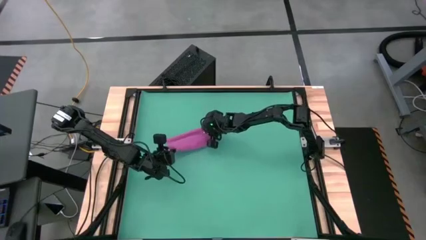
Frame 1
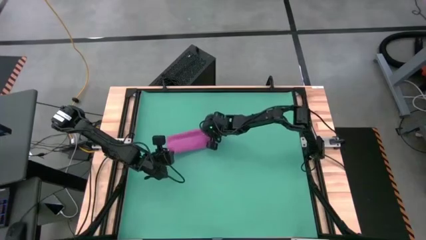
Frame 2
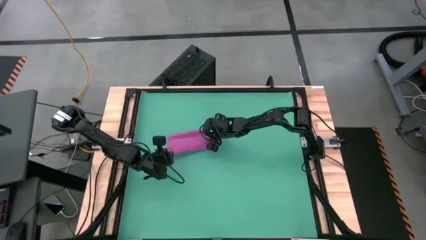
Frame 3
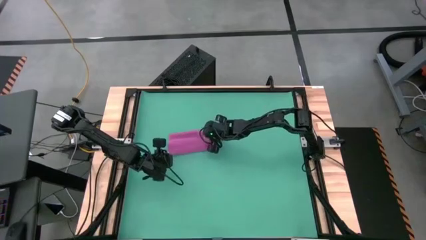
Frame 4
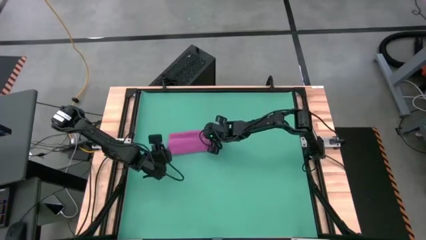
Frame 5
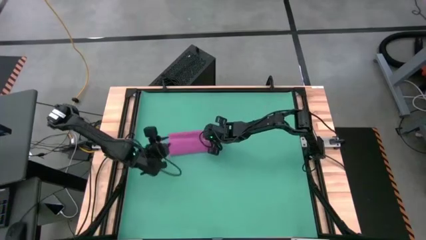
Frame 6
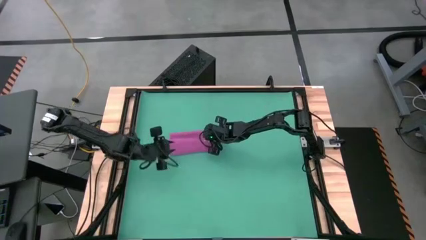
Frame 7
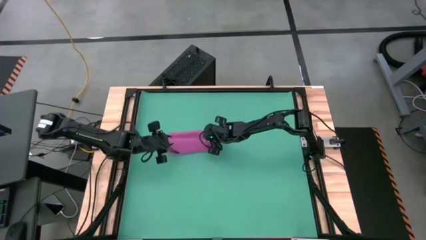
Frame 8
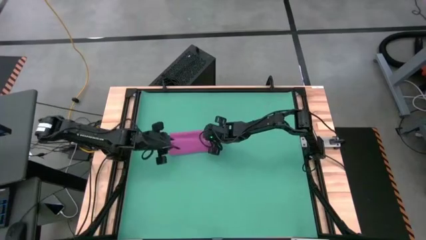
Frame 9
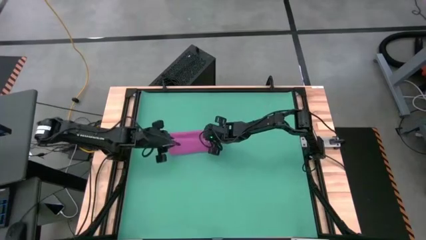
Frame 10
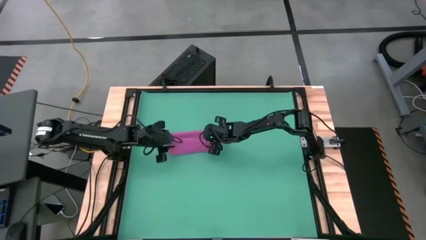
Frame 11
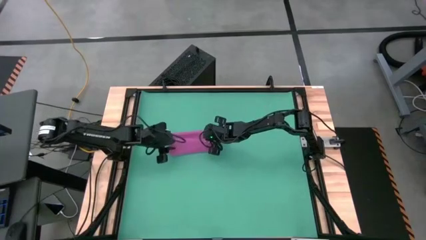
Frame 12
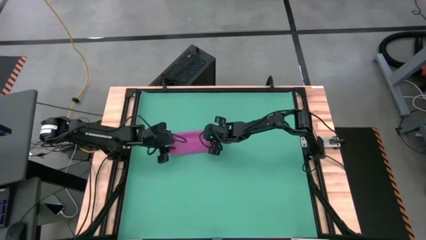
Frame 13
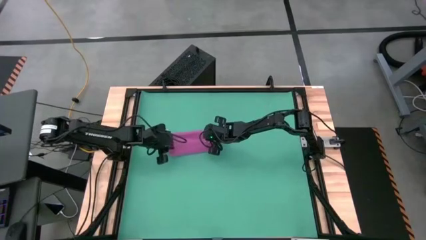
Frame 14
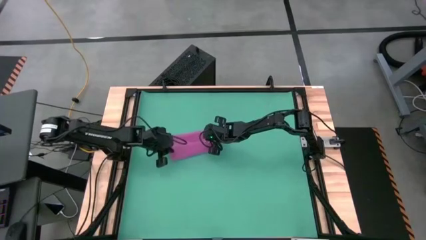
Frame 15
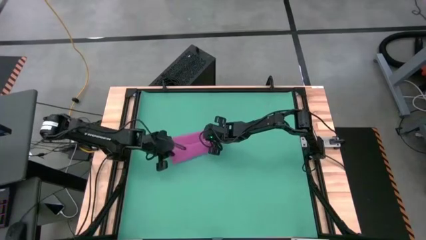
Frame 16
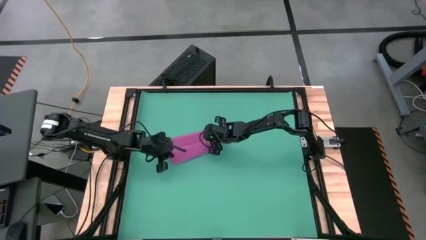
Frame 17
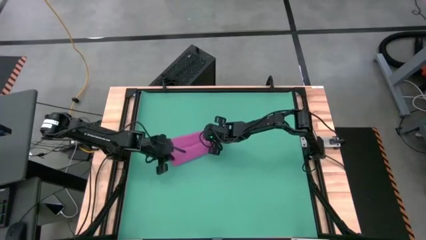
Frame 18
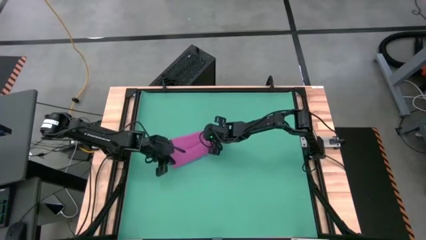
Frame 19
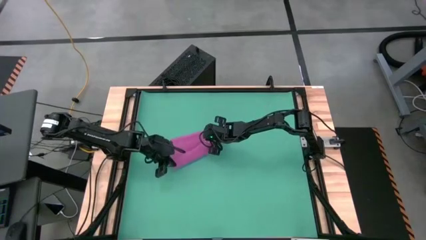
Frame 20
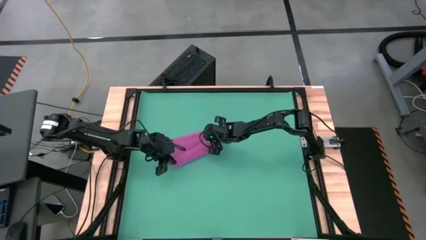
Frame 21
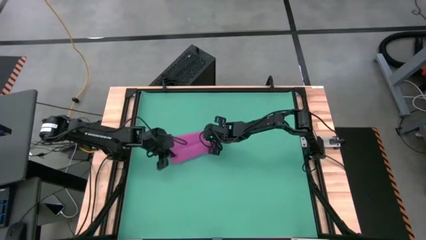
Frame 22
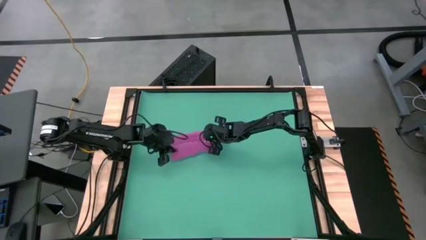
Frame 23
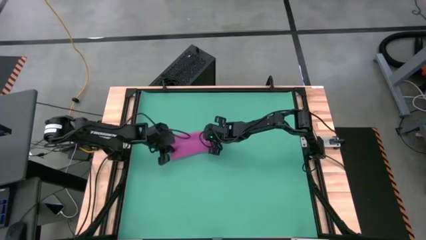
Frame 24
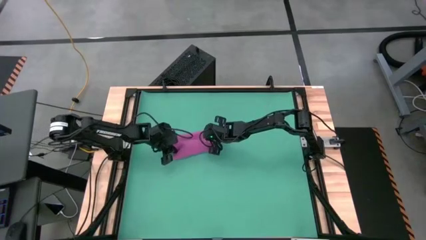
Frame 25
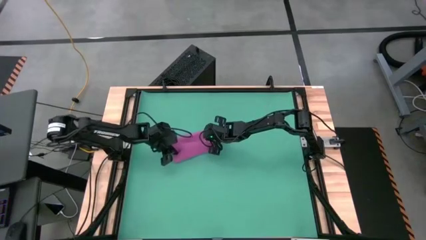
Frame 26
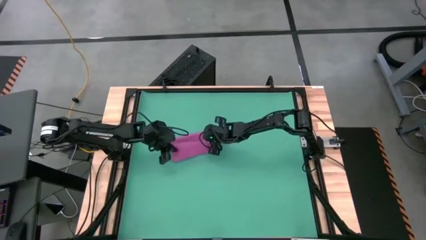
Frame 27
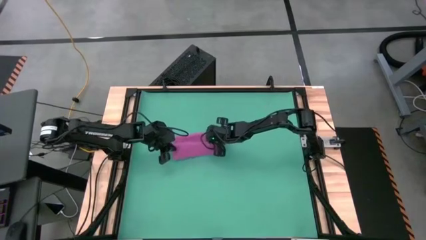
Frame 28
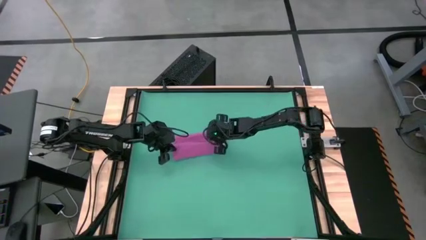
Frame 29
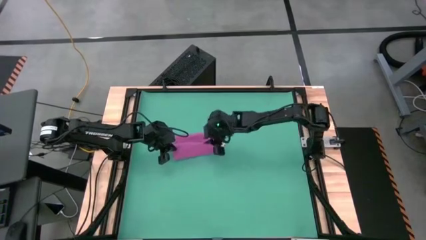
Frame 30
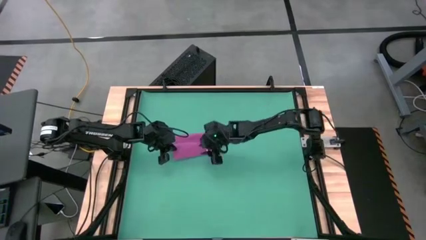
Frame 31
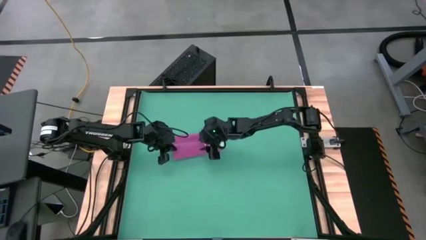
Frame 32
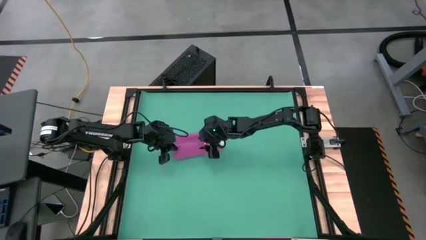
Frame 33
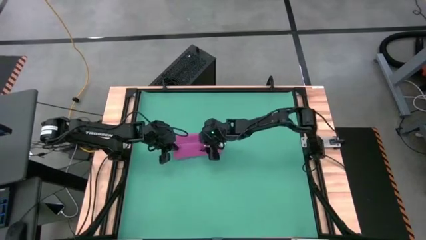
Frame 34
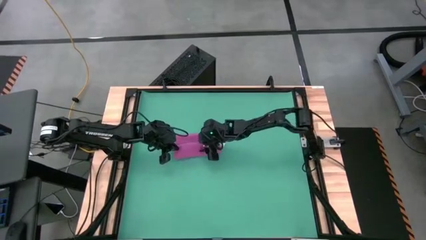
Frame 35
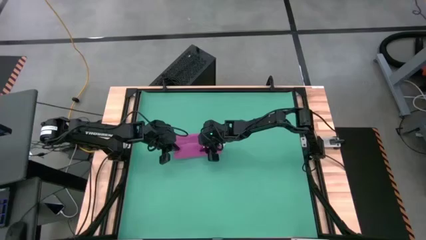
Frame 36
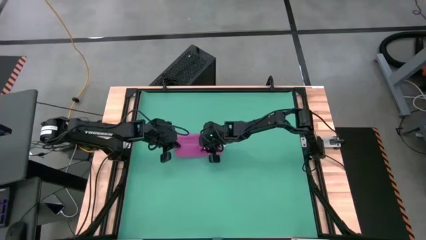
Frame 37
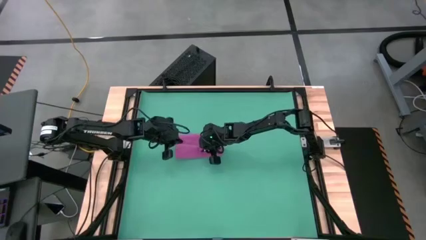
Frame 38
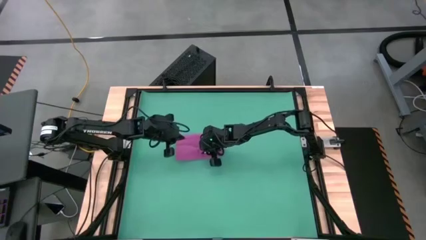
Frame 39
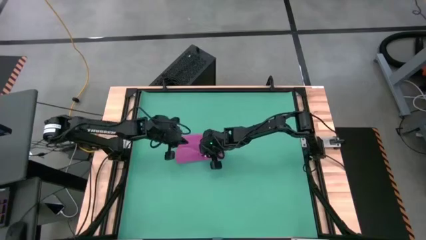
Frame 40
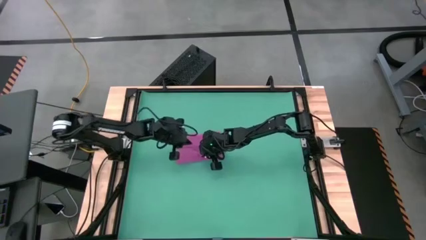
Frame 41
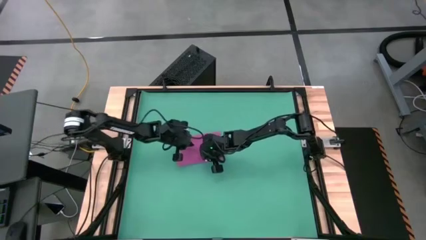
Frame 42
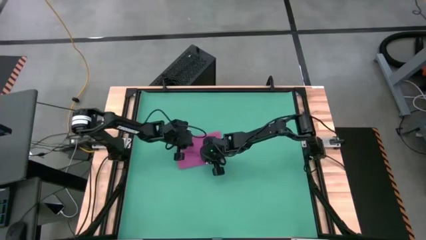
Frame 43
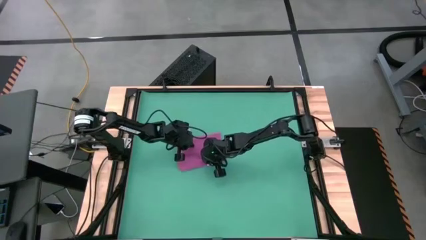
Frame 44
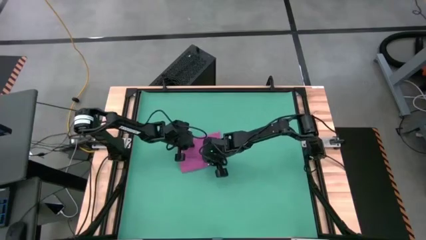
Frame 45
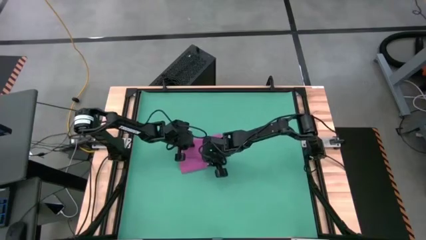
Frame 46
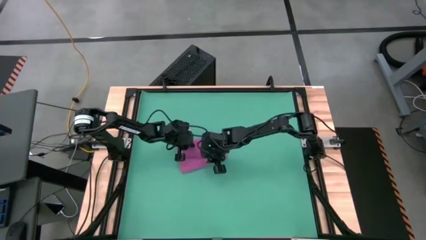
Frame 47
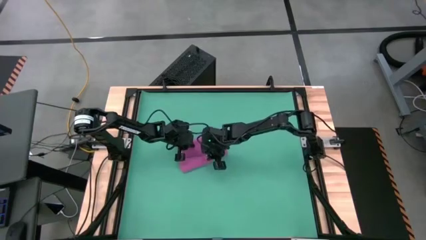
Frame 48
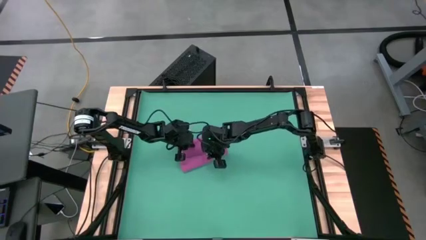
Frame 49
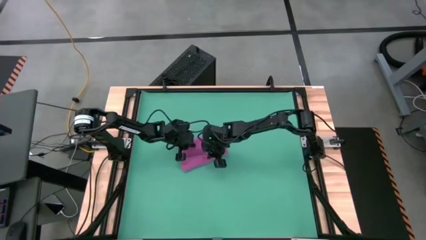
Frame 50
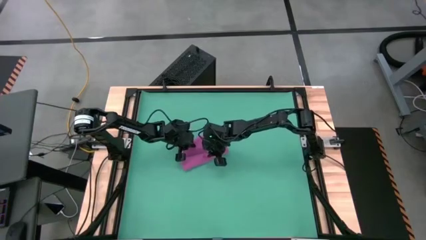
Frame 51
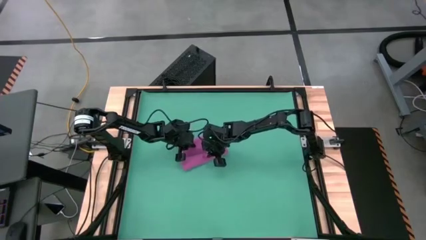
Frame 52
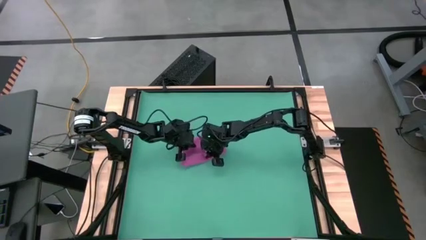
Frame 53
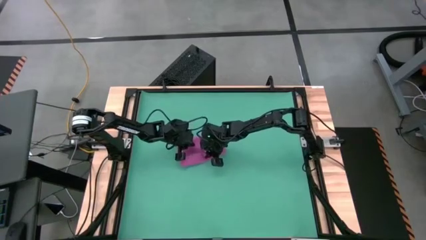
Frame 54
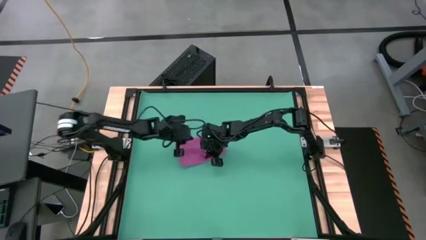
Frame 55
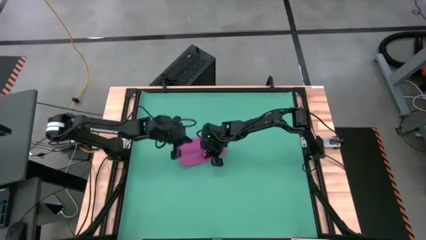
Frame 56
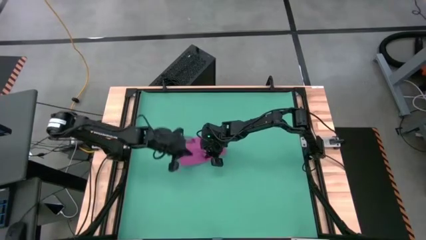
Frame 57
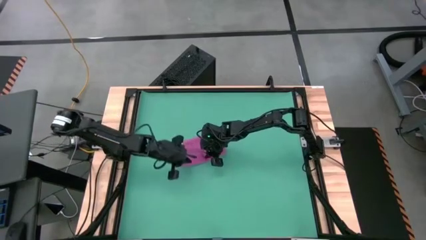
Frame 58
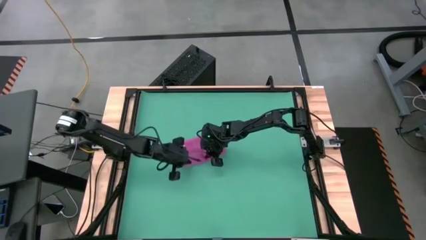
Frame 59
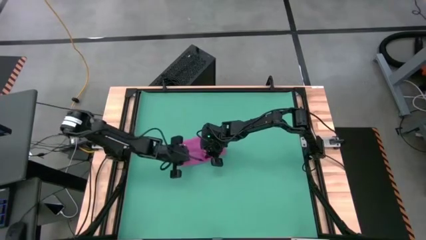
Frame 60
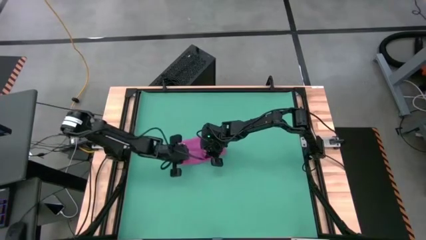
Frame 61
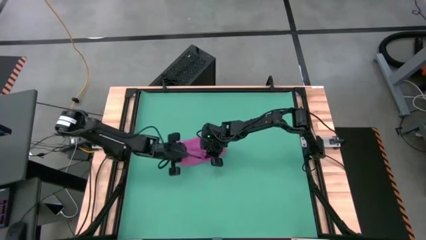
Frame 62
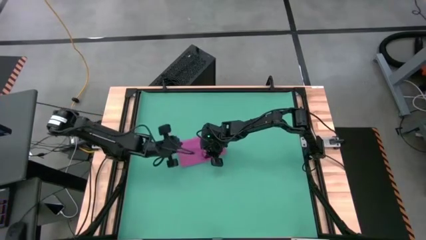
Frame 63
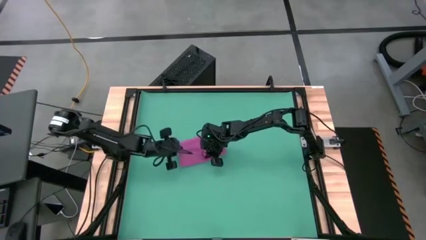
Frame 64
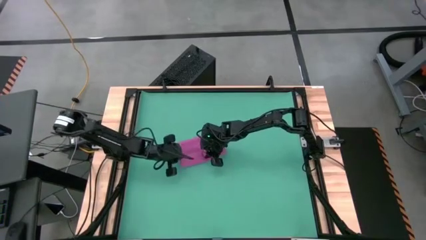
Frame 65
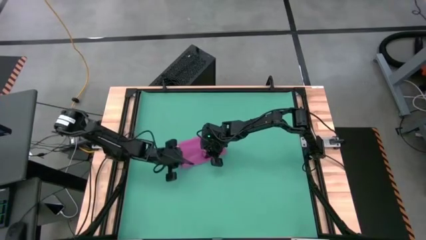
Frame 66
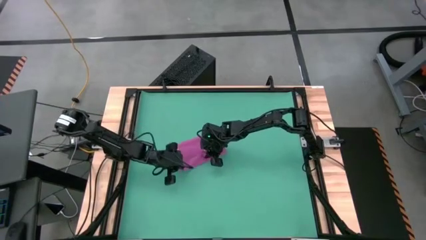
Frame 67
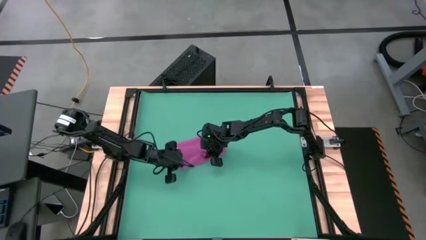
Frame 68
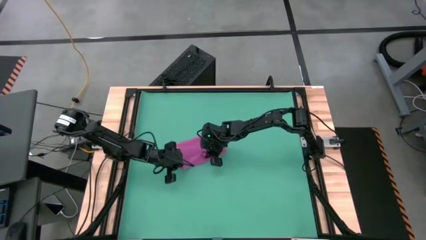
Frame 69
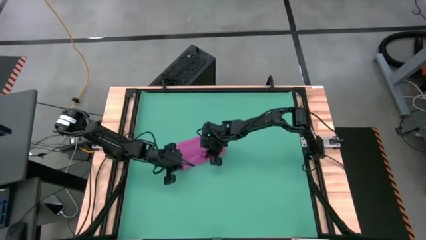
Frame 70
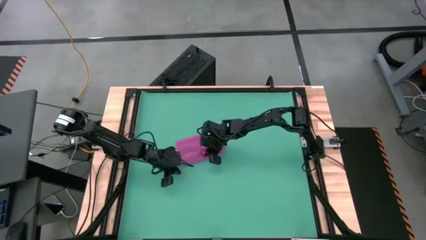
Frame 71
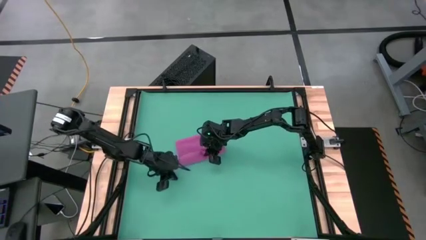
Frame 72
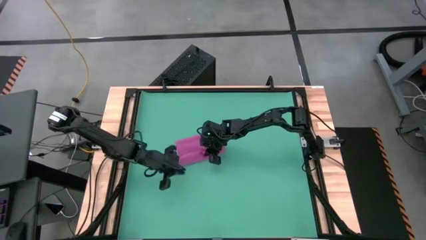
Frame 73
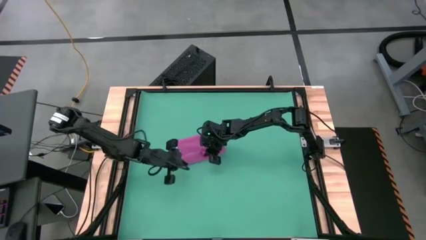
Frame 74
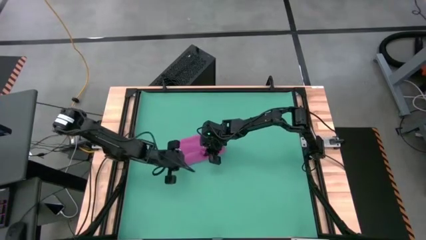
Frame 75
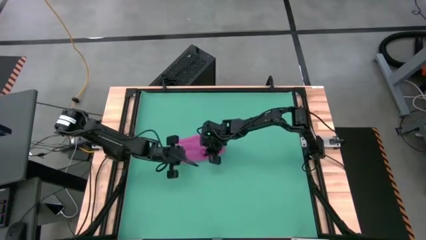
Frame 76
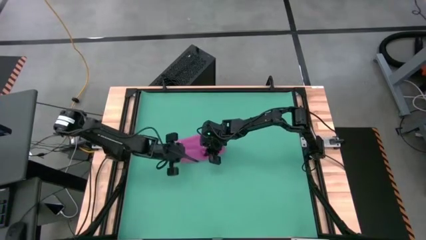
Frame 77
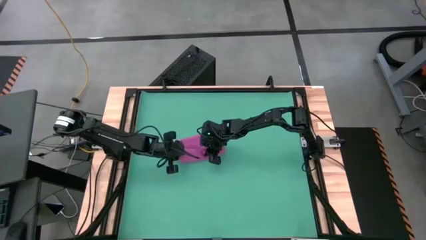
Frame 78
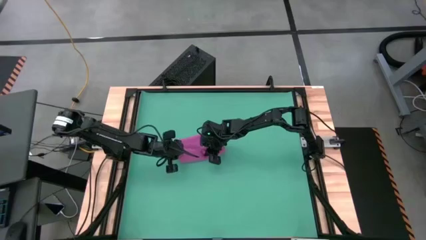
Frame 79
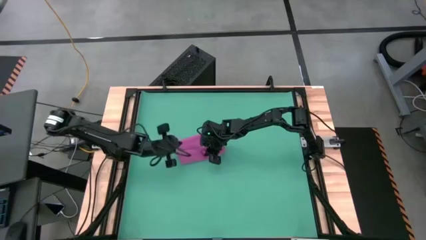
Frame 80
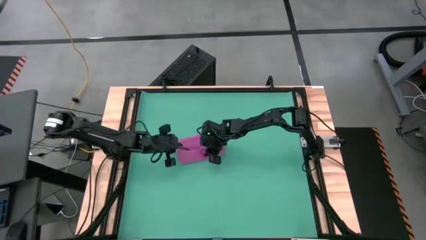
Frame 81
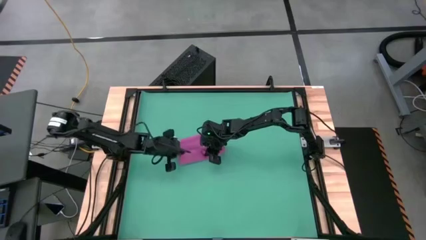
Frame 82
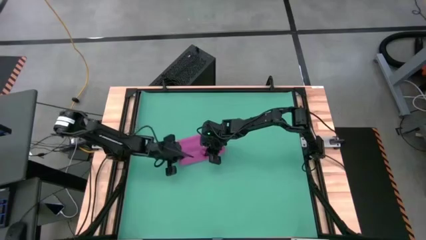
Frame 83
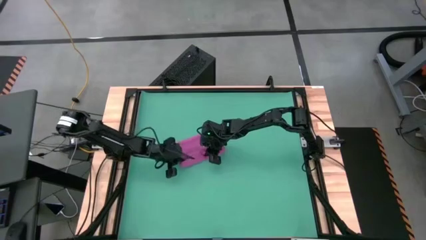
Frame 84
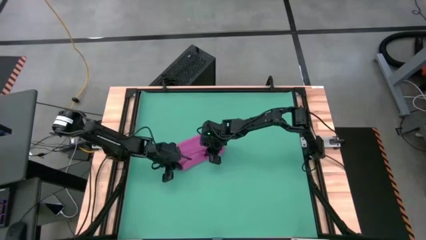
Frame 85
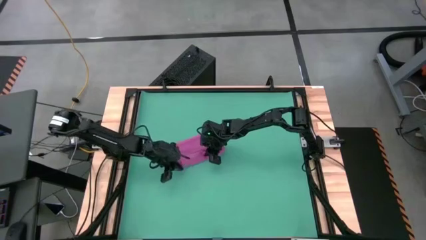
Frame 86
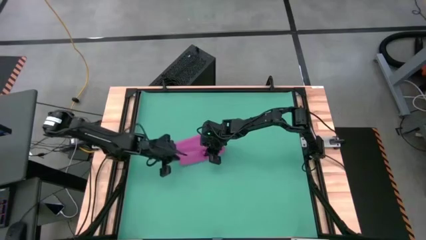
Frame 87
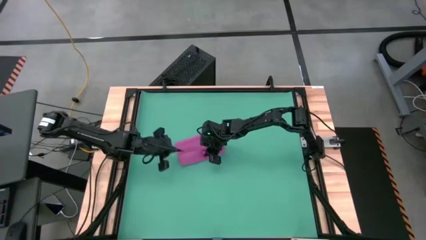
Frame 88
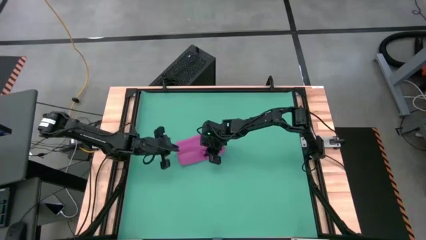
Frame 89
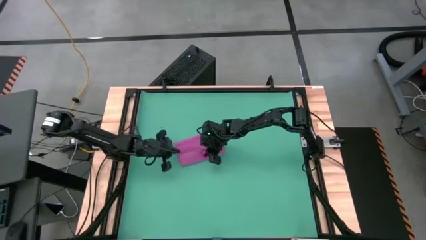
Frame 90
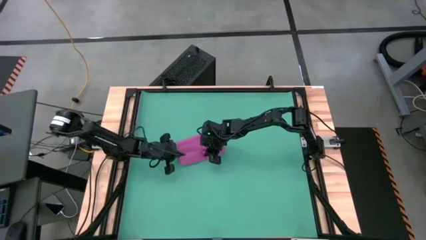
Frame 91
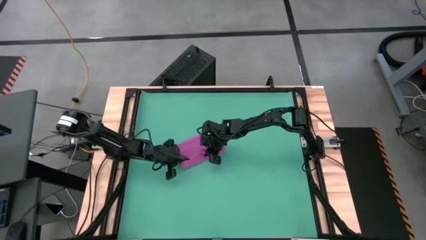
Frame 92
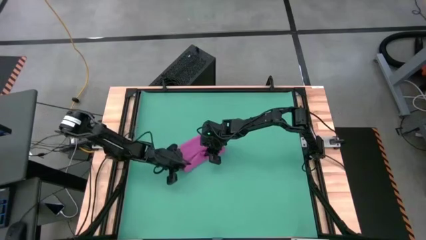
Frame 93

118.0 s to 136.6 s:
Task: Roll towel into tight, uniform cylinder
Roll the pink towel
